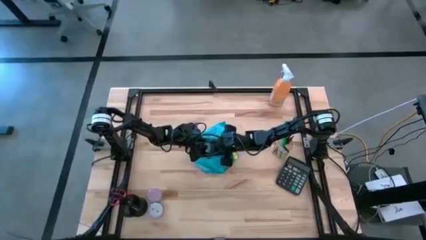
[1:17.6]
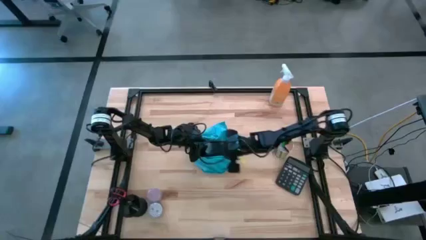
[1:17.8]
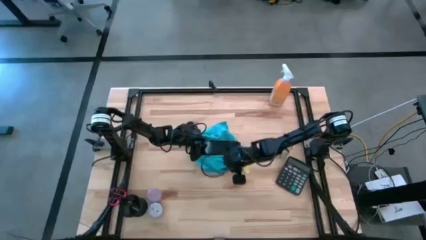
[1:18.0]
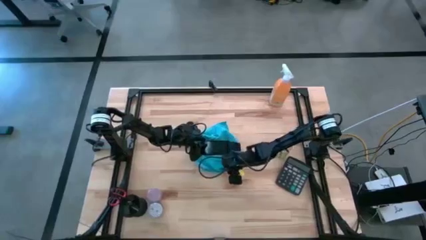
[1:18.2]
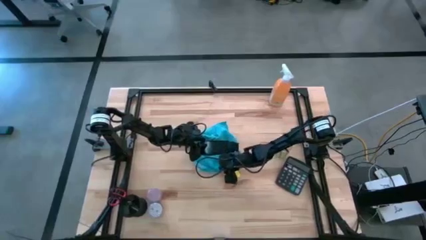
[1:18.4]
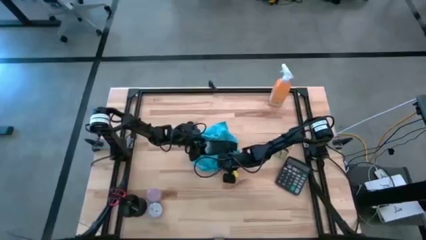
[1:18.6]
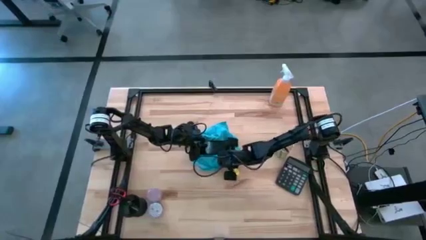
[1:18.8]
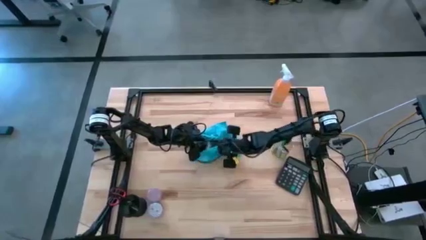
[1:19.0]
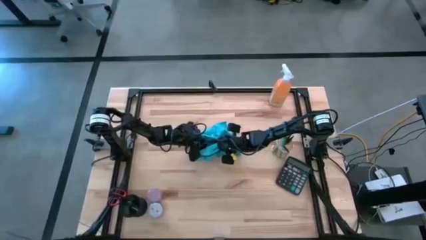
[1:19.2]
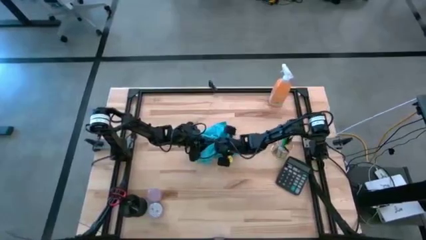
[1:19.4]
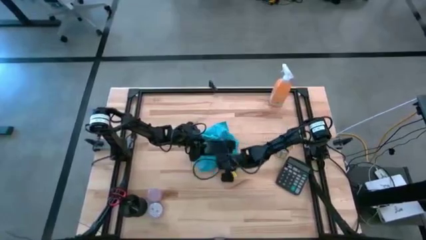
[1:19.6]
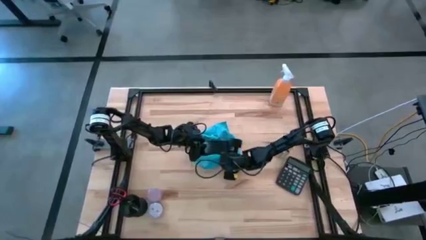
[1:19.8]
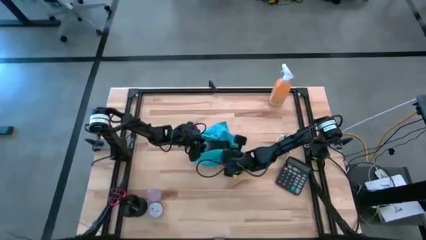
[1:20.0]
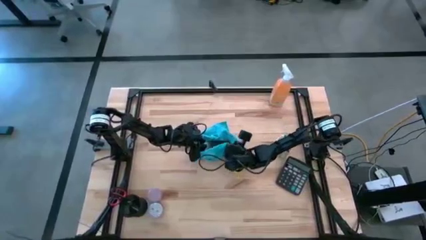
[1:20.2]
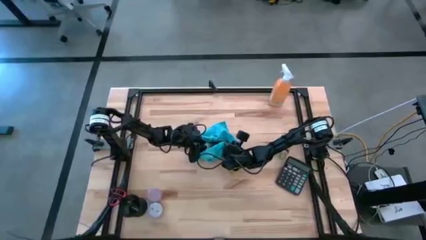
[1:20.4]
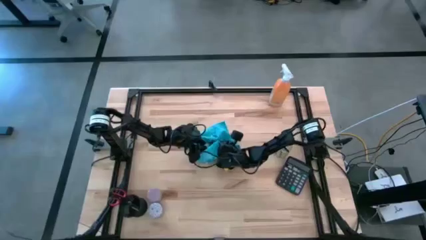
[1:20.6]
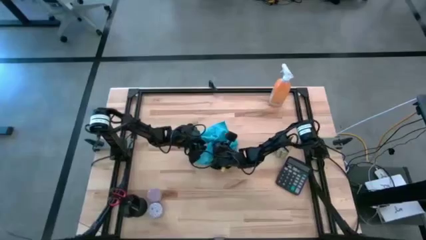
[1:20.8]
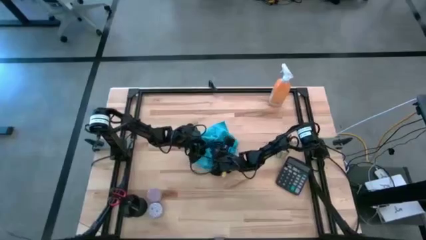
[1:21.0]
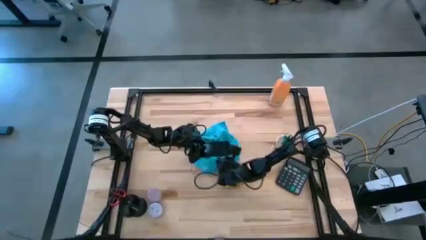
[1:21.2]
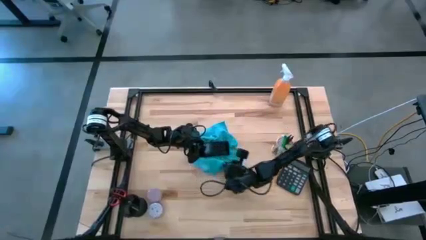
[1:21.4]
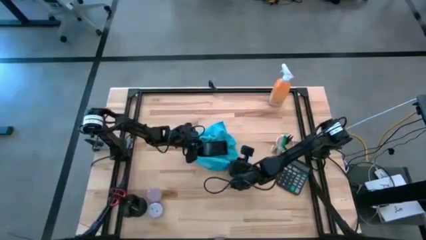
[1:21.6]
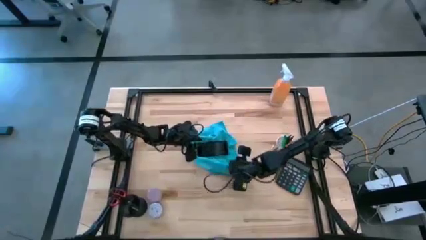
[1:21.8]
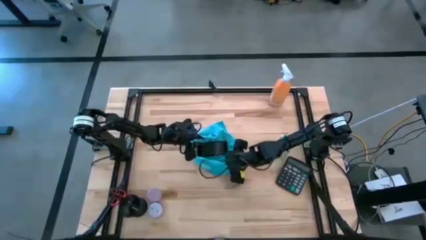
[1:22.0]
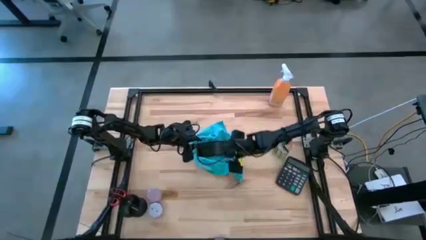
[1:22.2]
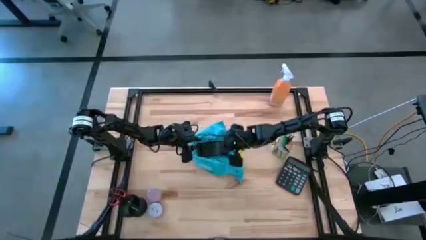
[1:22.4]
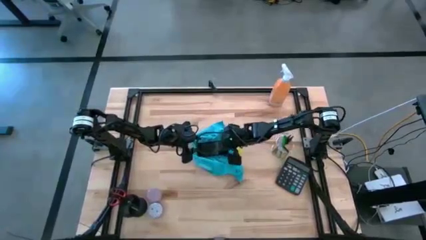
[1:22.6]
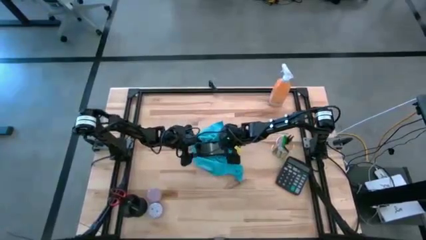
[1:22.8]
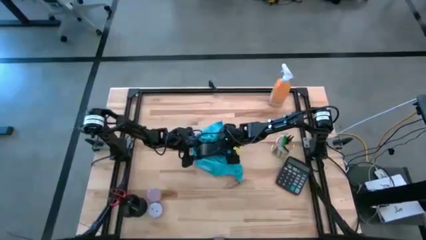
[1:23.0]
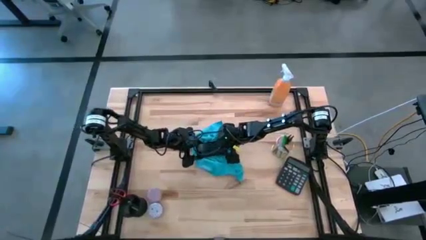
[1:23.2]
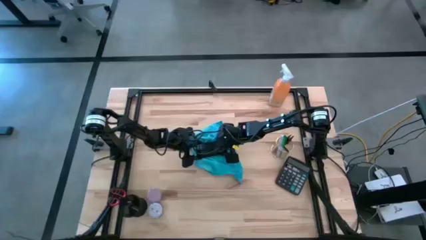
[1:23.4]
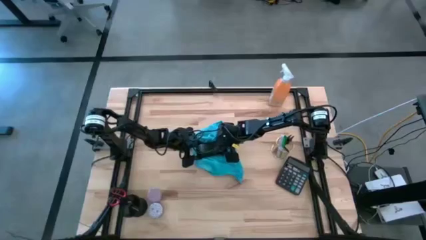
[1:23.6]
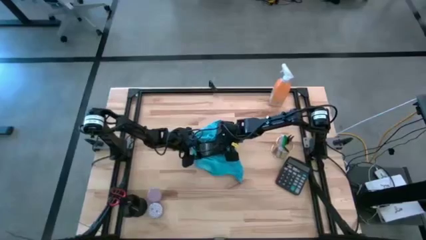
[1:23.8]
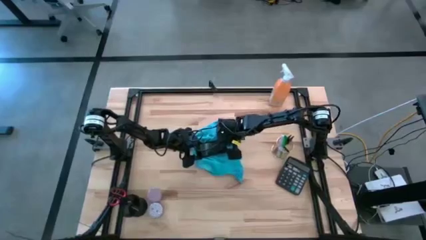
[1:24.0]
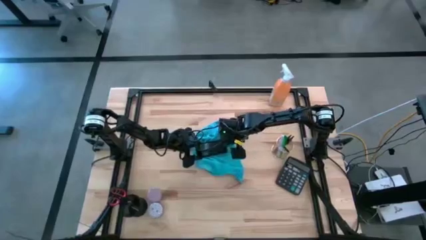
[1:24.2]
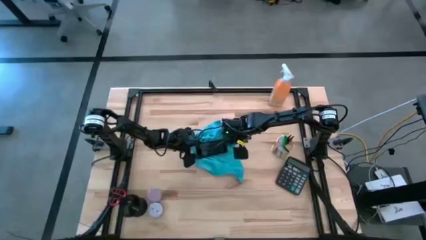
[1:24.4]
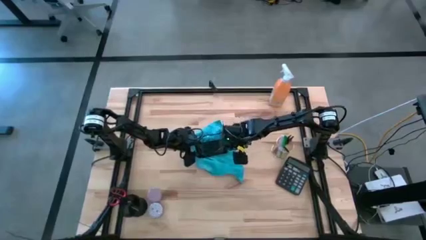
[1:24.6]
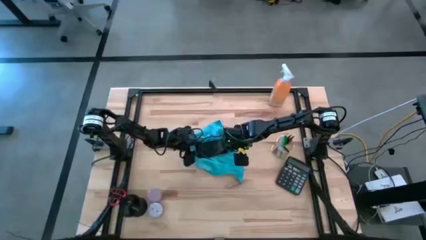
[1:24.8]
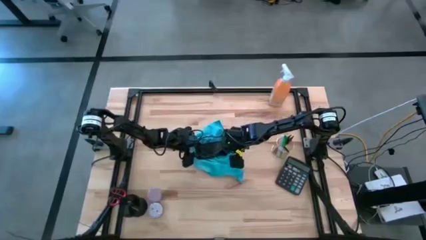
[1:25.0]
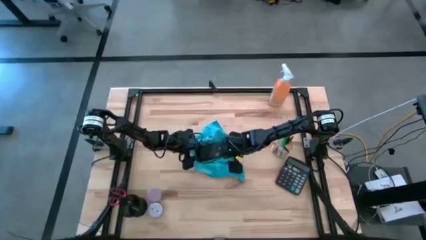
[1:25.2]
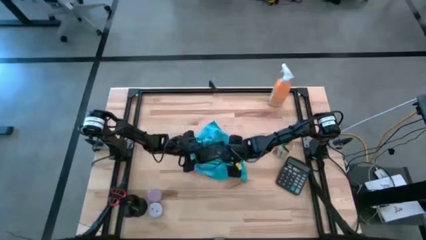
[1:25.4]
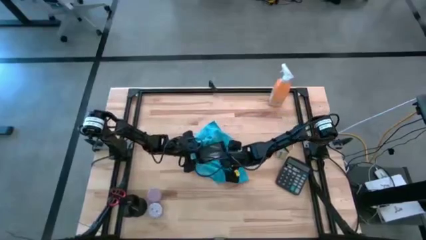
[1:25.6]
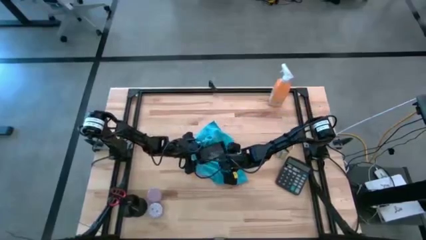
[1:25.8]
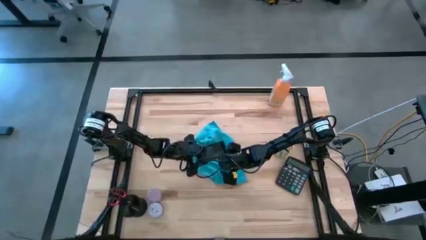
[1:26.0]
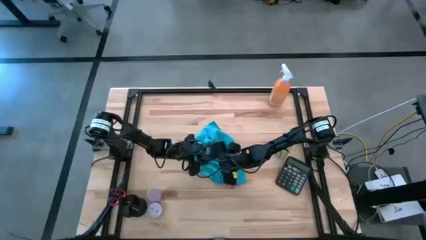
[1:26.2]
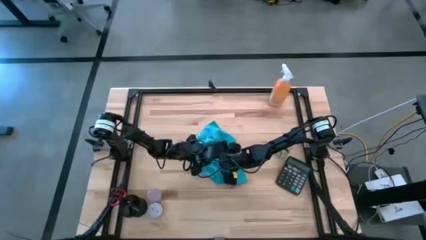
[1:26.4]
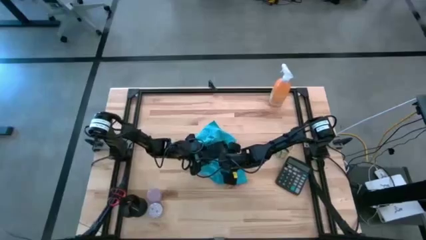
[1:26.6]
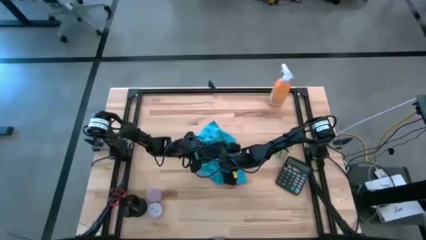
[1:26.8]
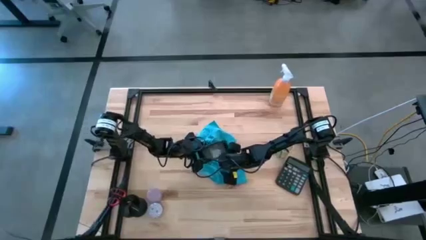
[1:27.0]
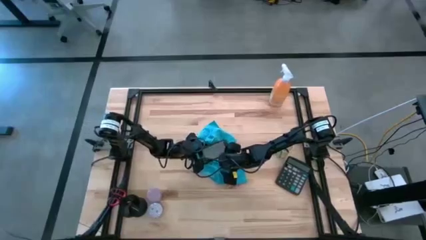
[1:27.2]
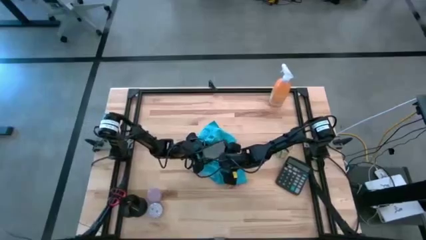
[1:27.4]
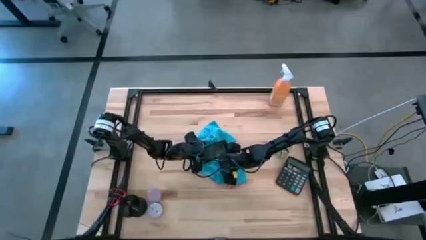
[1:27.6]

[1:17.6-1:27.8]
Task: Apply microfiber cloth
Wipe the front and back of the black cellphone using the blue microfiber cloth
